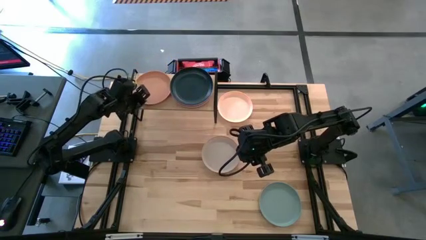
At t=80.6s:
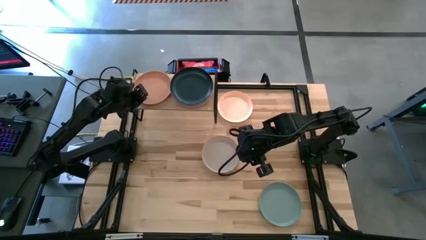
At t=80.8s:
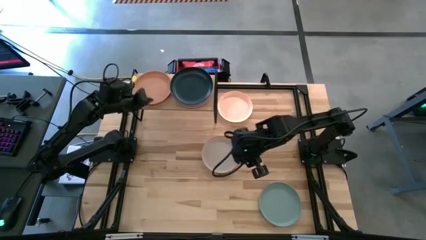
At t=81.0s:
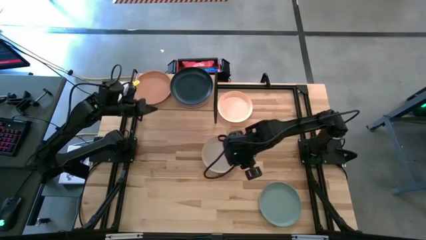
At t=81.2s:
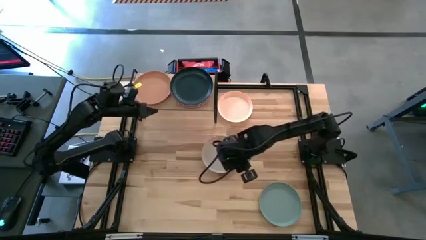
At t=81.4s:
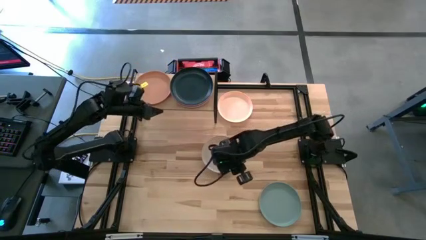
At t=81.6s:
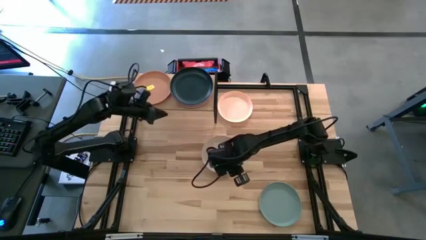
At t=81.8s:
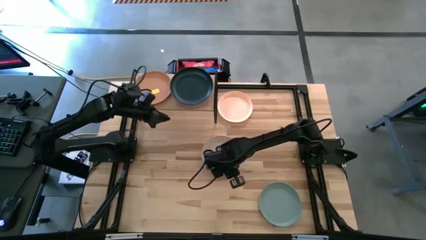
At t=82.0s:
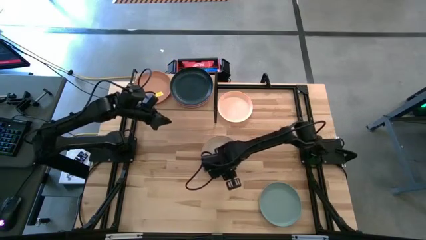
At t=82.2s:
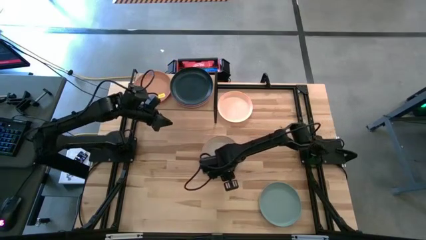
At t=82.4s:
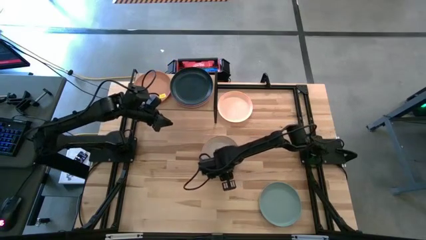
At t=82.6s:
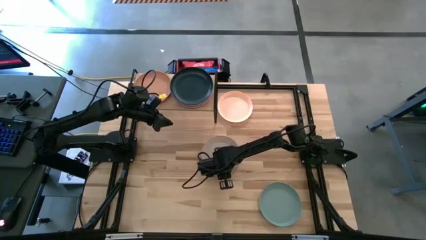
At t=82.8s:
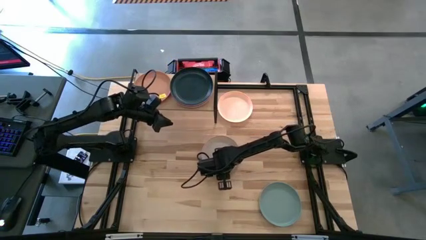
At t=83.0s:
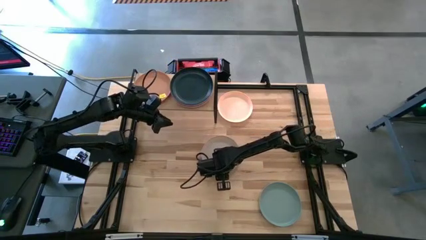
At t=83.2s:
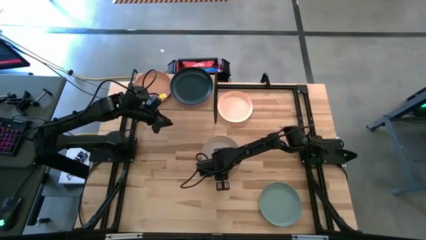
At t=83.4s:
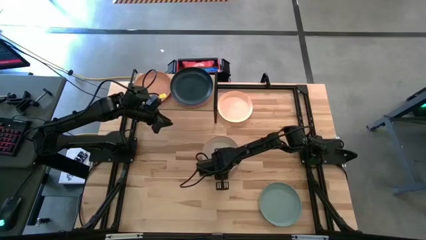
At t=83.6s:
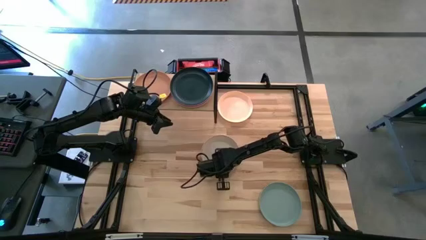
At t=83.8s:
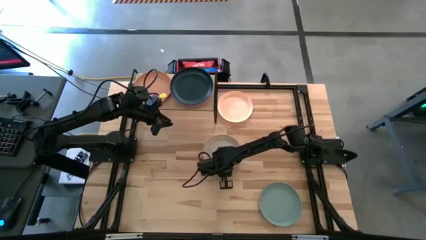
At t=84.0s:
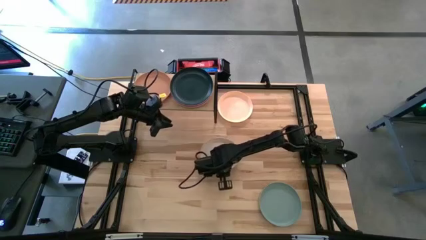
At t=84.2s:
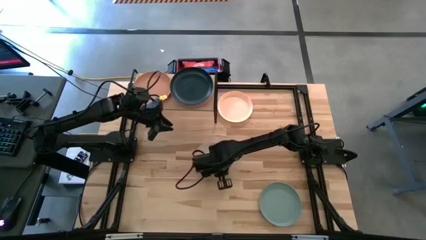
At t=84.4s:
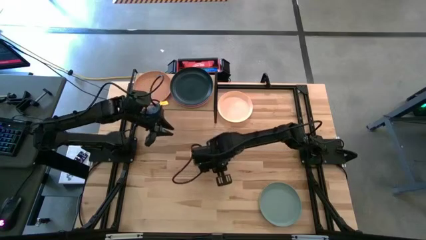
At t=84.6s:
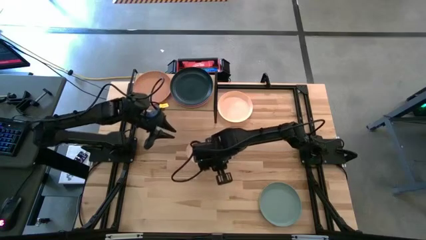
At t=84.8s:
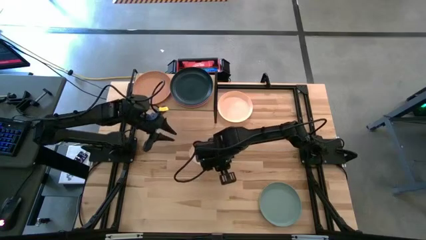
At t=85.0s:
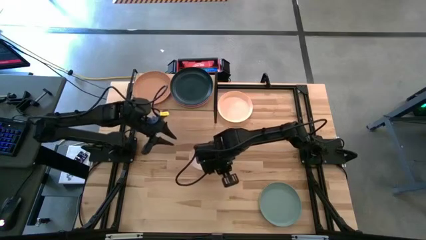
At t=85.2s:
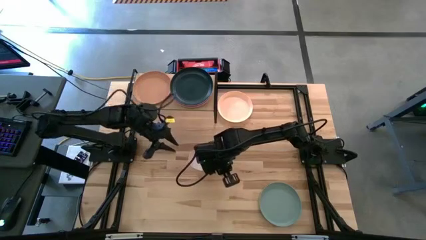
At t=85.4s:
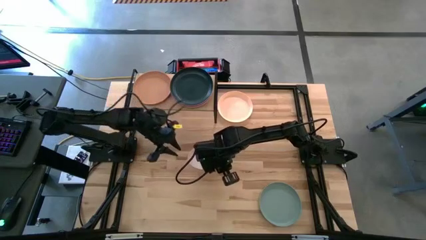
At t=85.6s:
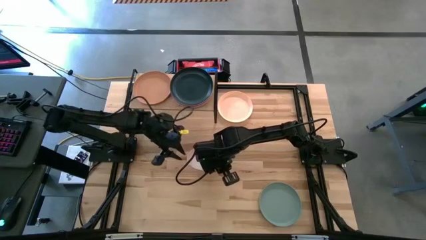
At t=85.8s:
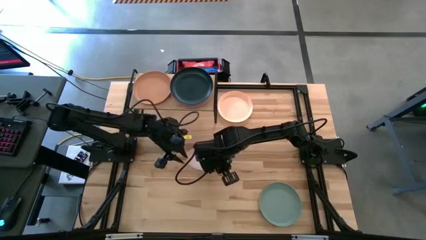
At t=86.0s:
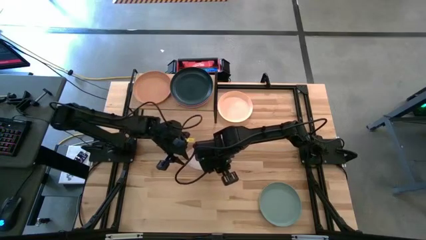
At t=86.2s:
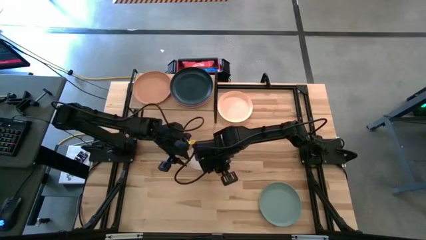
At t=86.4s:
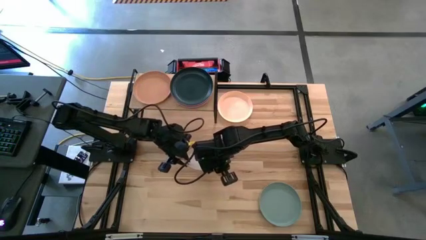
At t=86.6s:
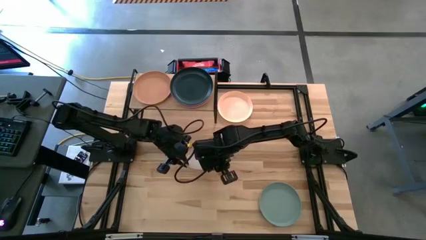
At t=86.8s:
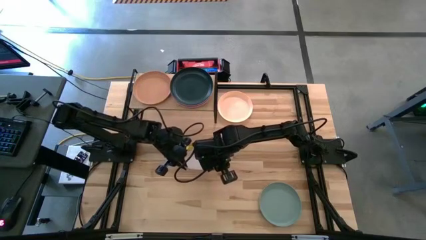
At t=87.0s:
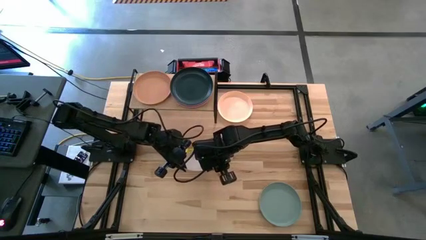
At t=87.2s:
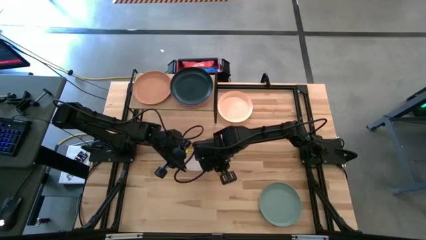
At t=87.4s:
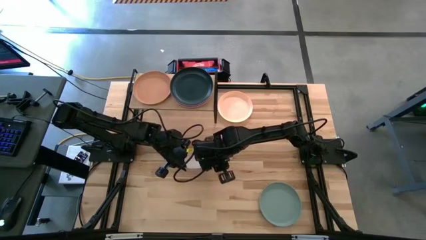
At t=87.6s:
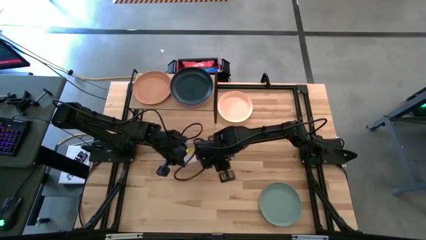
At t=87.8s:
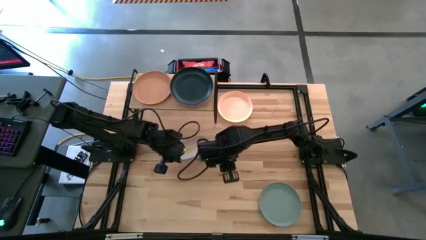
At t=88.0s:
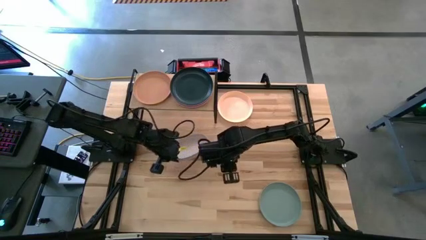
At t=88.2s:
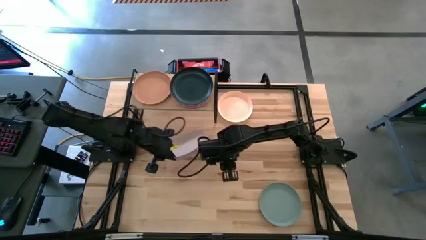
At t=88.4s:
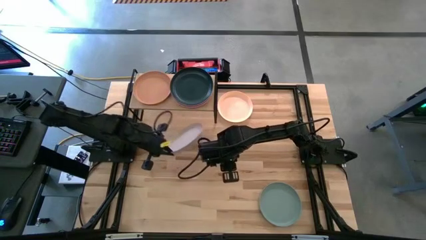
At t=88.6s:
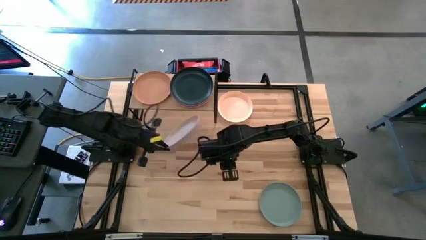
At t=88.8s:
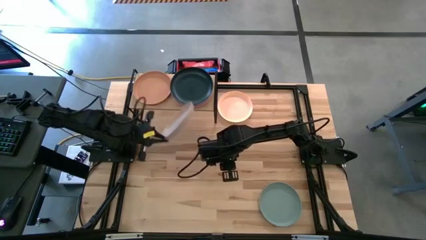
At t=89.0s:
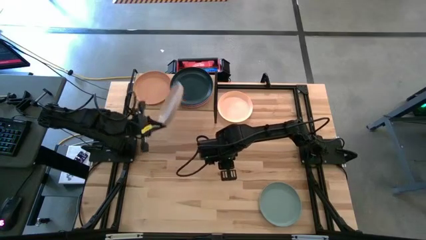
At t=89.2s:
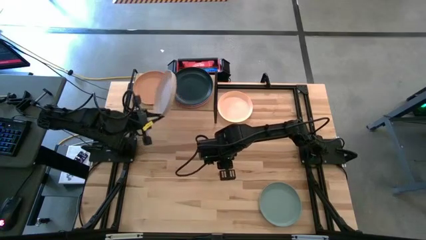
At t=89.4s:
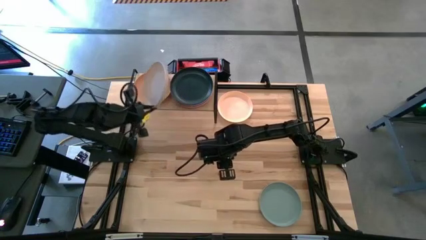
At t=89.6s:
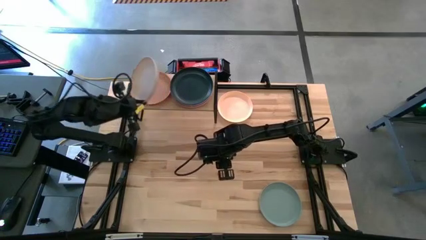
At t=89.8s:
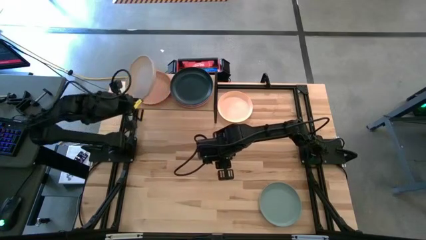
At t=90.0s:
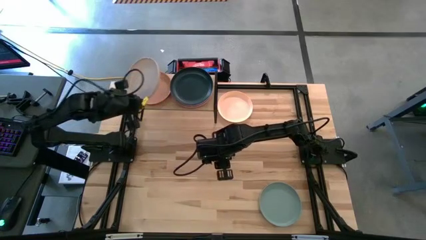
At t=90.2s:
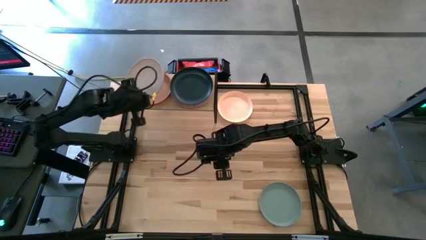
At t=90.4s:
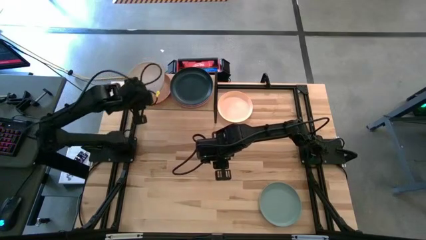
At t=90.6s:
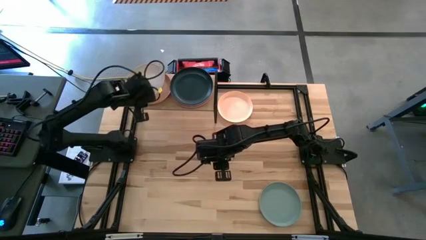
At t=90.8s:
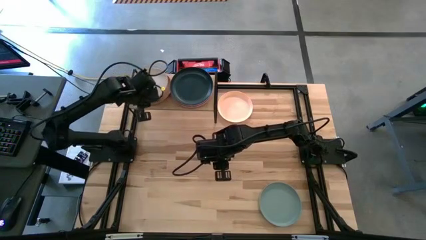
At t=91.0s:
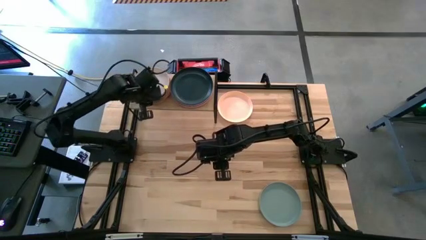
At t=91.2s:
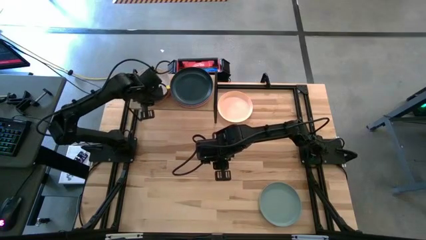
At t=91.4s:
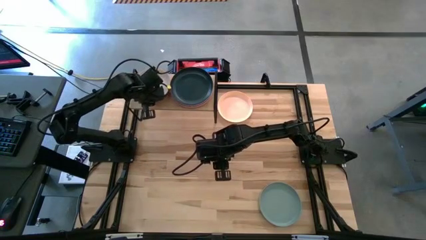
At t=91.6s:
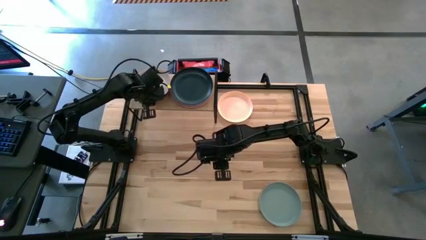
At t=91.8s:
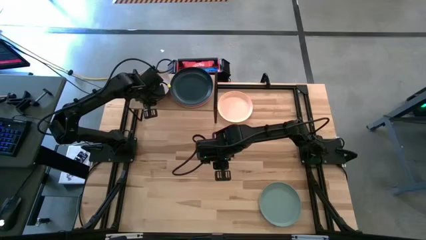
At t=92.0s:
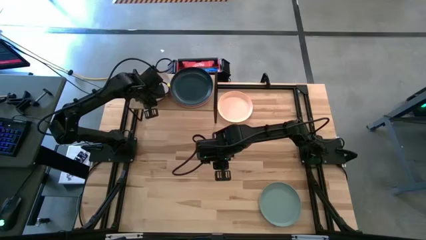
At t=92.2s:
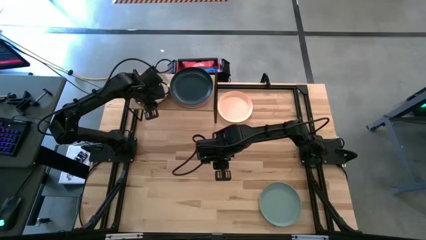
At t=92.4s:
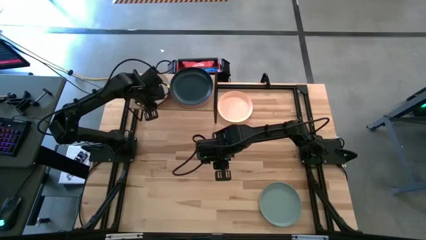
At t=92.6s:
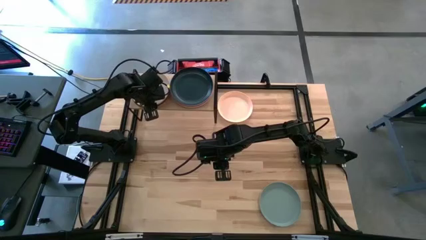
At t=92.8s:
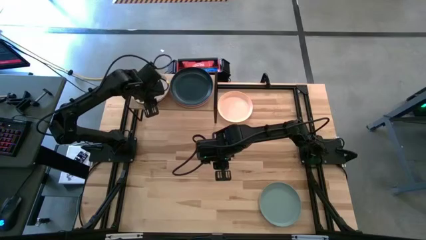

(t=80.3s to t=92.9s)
Task: Place and stack plates onto a shelf
Stack the white plate on top of the orange plate on the shelf

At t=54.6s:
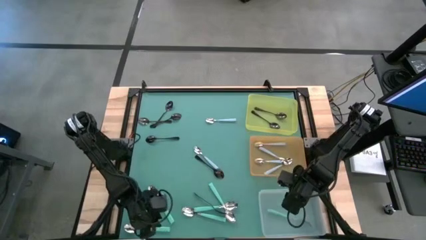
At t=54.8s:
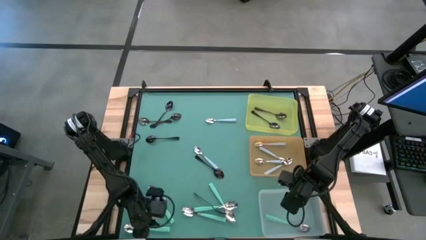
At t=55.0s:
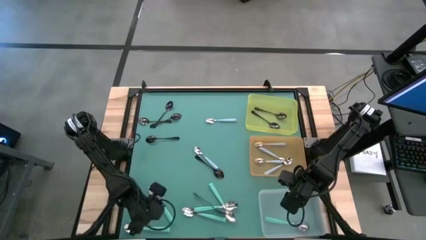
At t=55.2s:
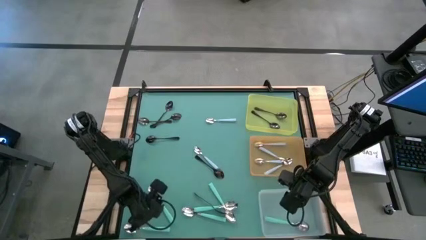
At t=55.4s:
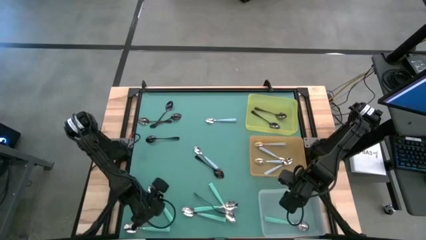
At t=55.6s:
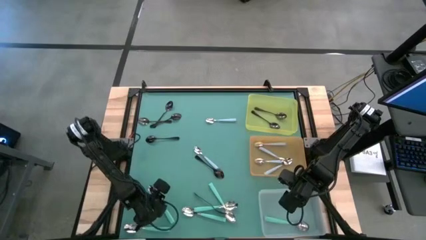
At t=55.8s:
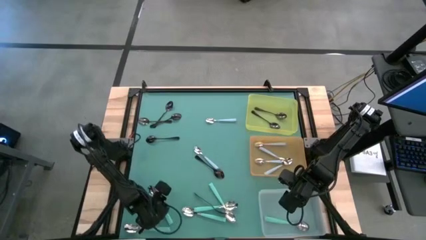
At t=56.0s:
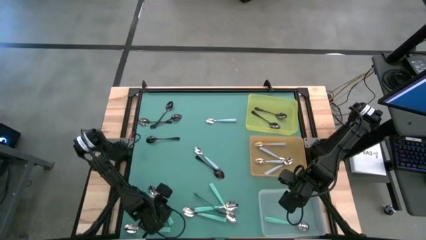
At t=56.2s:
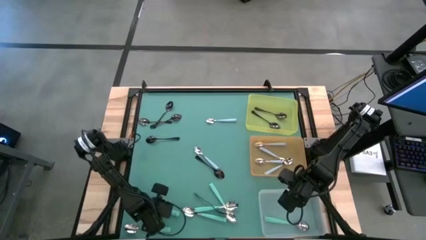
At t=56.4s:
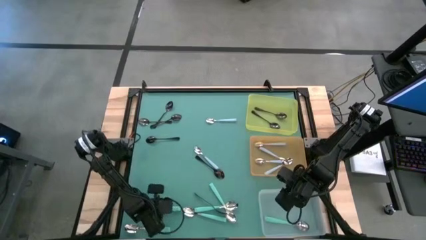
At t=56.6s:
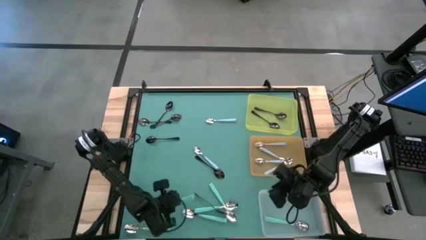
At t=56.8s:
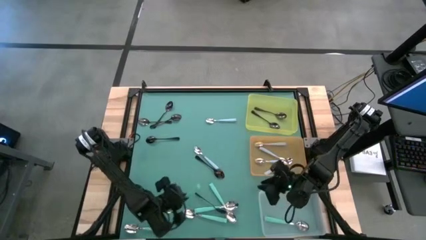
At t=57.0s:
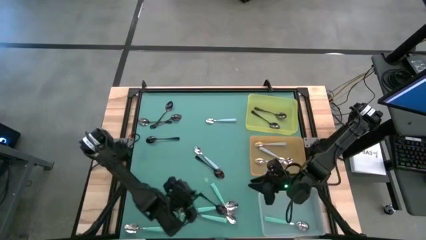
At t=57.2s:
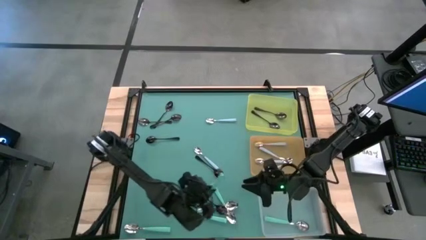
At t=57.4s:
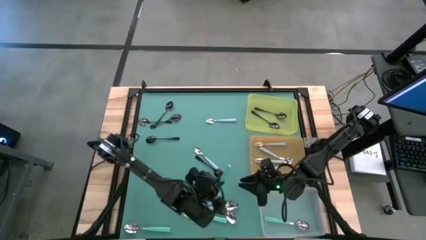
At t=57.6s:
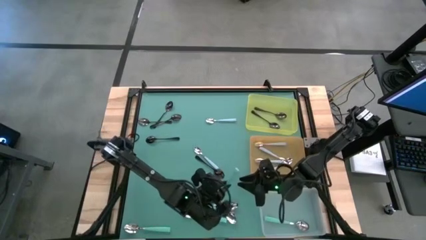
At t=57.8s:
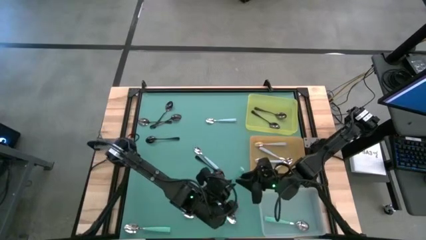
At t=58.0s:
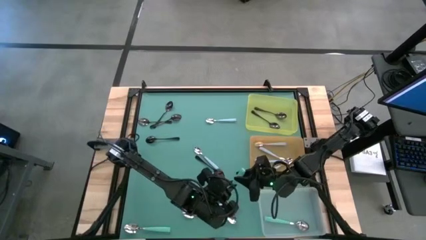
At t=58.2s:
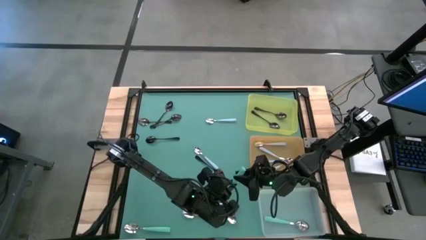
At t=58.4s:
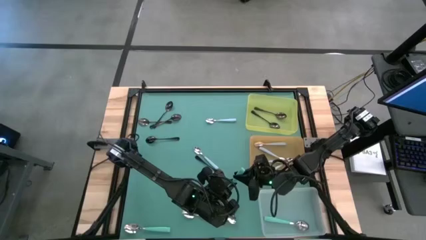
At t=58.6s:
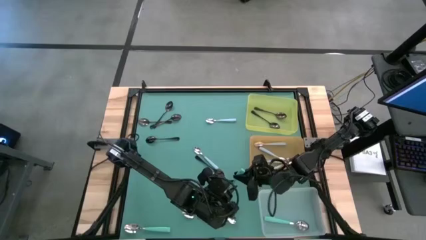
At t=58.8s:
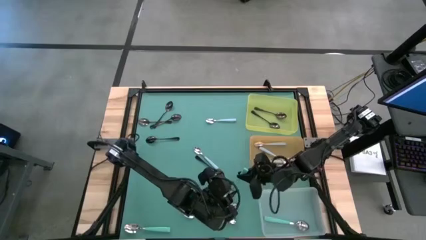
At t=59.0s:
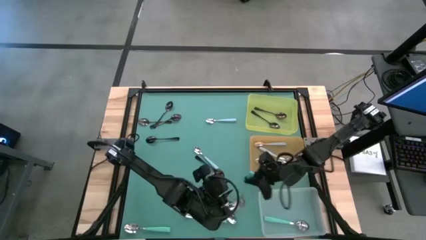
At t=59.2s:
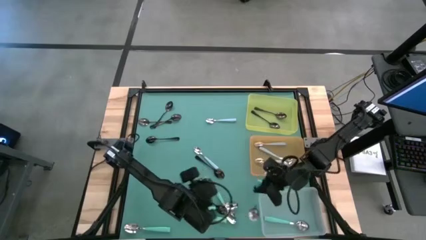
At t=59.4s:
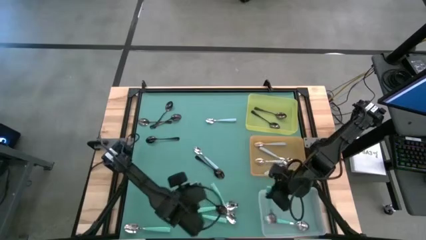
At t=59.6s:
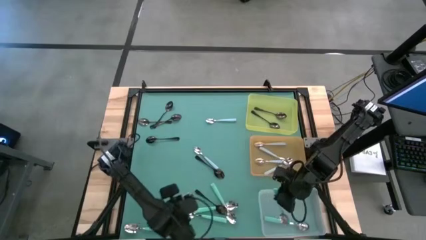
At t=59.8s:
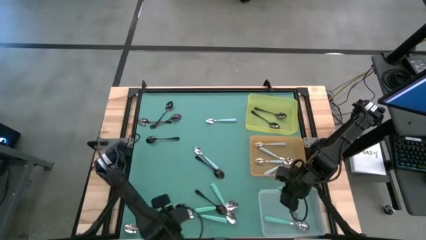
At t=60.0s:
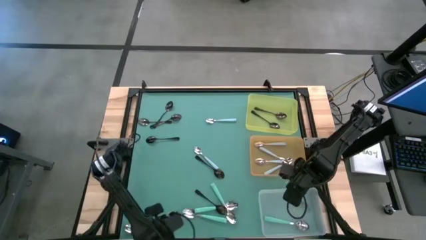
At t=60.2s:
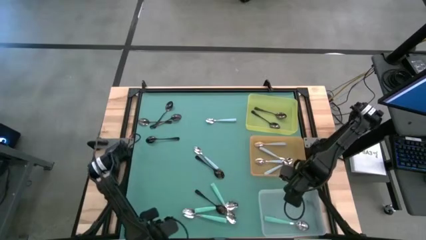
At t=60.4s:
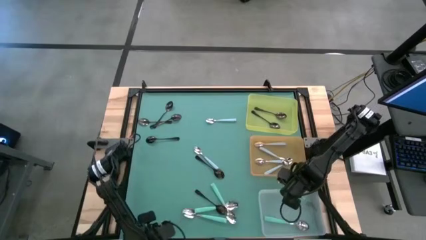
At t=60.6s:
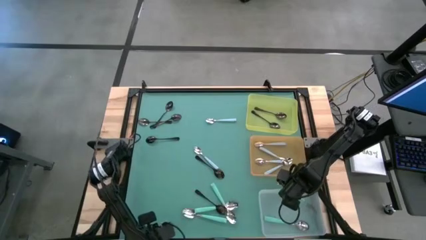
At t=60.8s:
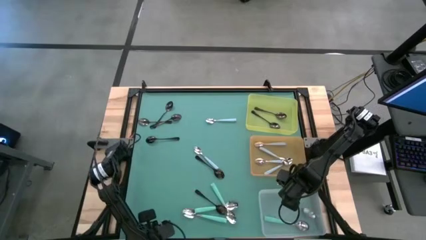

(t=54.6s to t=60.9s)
Task: Sort silverware by color (type)
Put the green spoon into the transparent bin
